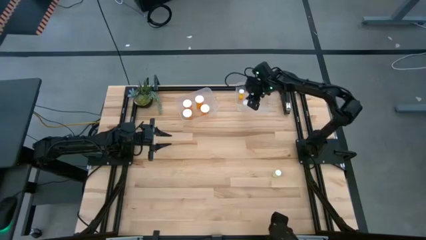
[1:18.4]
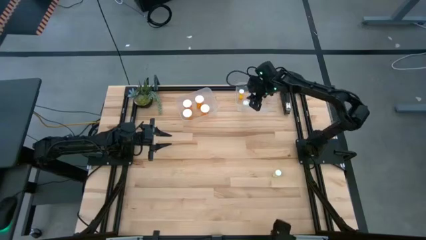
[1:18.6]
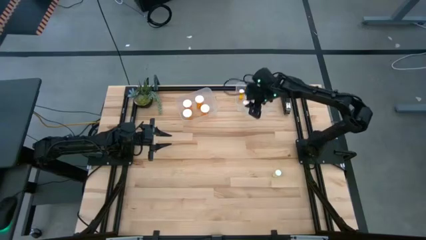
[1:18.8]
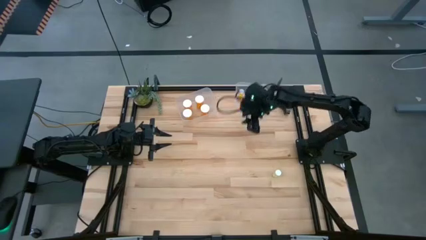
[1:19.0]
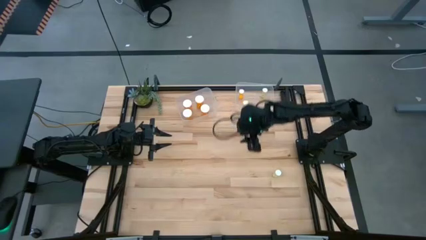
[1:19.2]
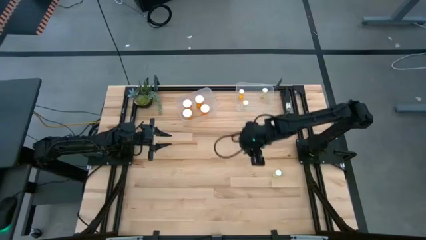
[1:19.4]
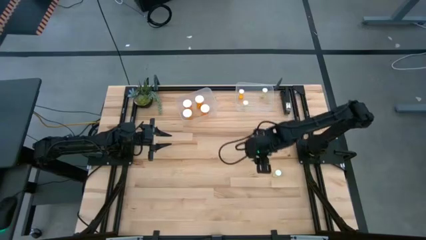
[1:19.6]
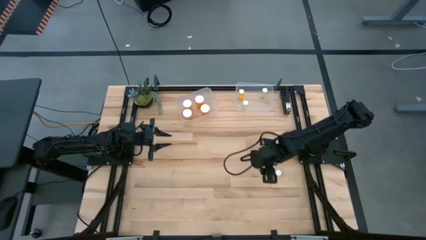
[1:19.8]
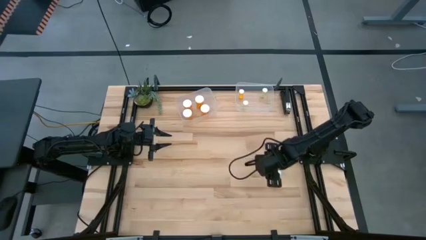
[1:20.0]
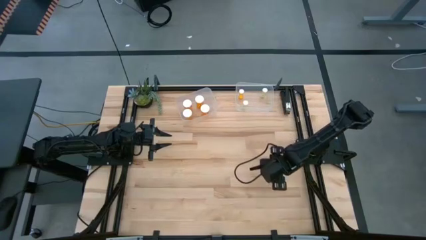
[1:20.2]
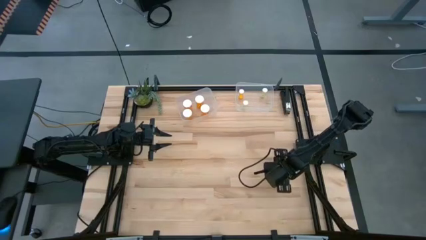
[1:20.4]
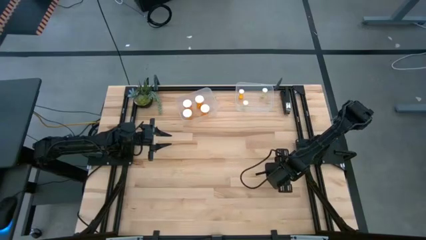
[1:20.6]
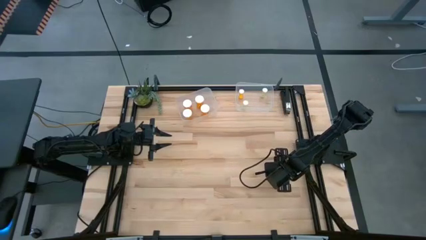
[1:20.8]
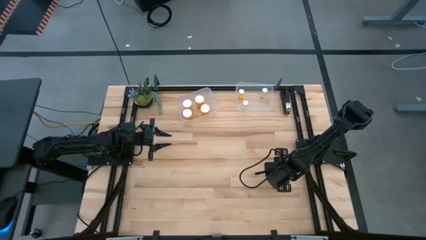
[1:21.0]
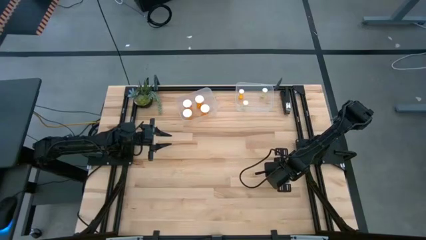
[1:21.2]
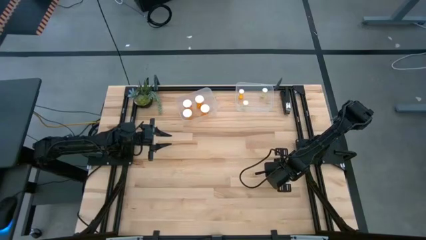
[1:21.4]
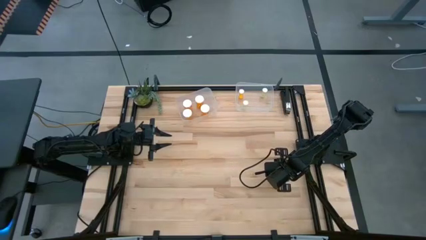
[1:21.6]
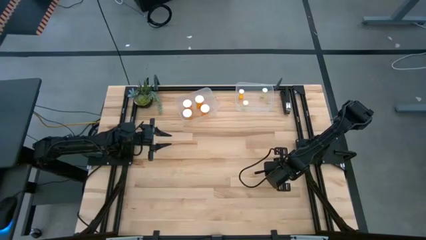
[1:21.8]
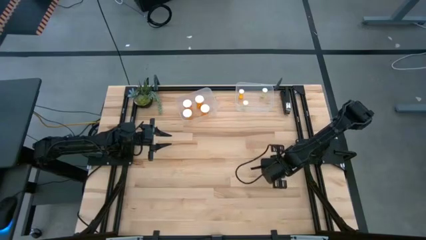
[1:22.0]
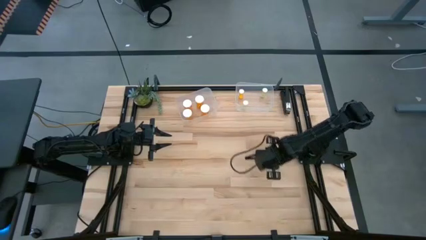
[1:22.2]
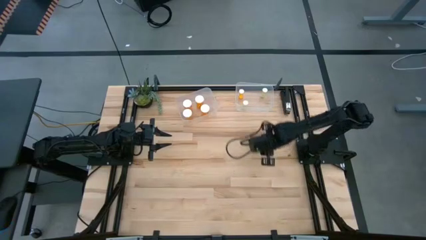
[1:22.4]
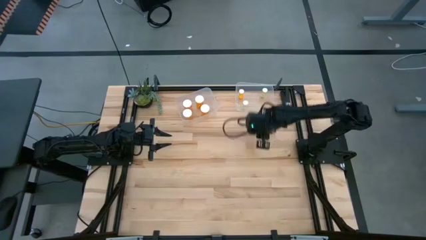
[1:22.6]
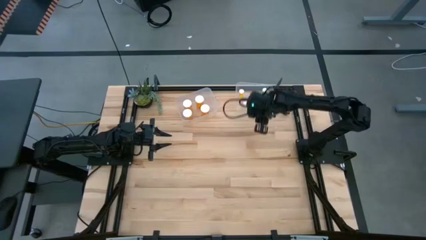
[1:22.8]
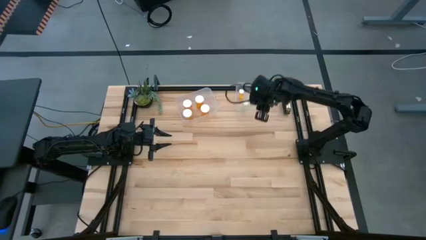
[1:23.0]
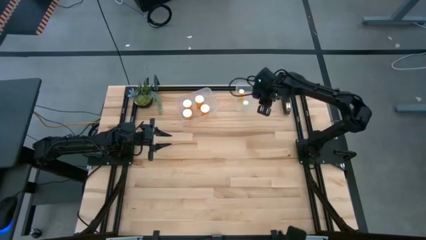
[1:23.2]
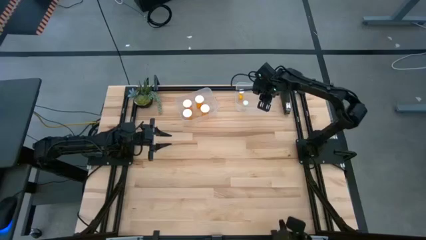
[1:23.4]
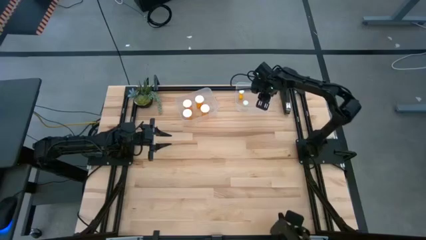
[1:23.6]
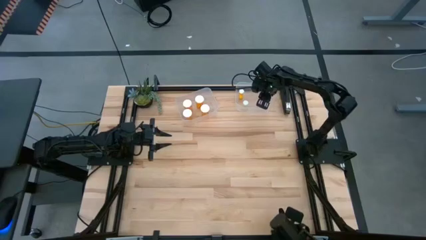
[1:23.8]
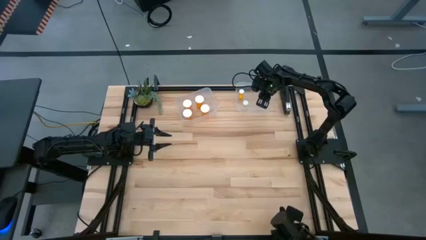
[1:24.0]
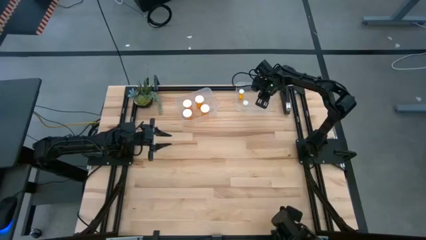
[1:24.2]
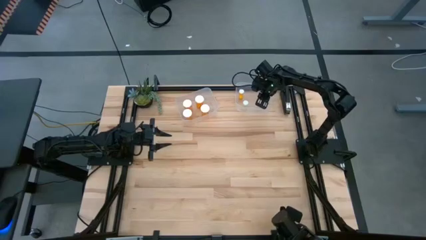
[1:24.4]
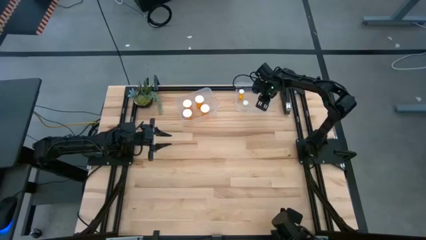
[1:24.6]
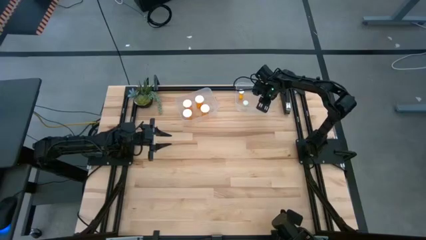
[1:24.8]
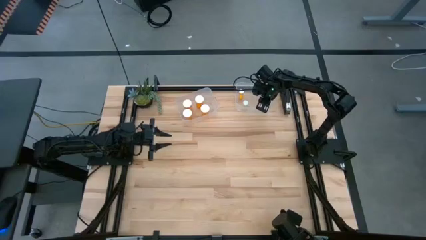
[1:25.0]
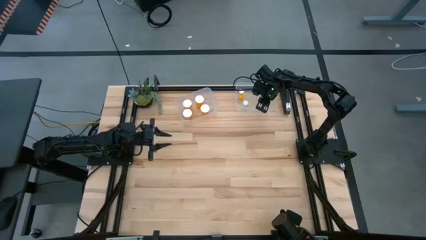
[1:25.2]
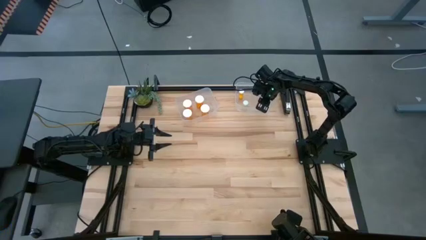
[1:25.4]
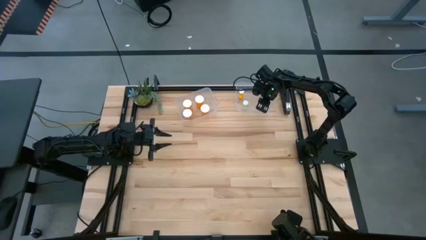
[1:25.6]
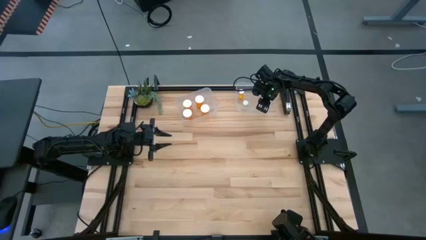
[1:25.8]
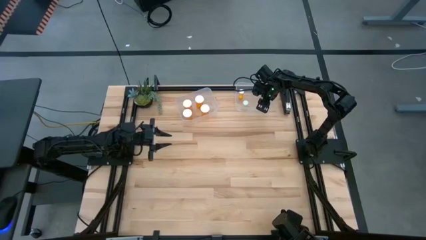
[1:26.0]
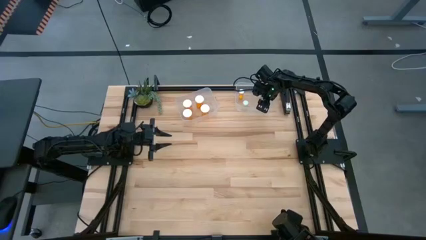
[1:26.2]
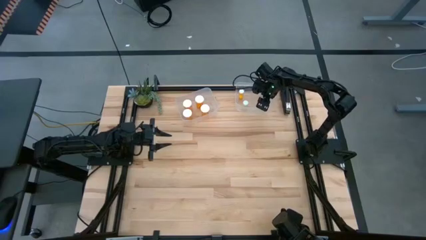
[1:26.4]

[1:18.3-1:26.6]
Task: Pick and place medicine bottles into bin by pill shape (circle, oval)
Put the yellow tablet bottle into the right transparent bin

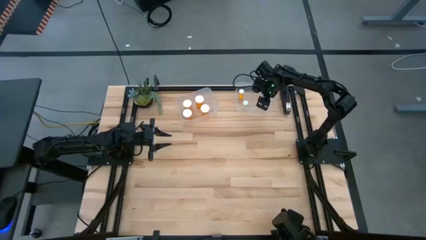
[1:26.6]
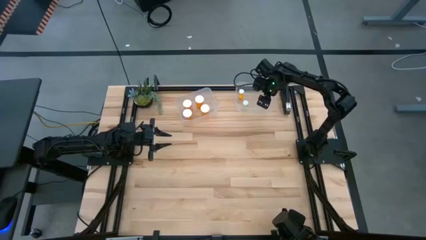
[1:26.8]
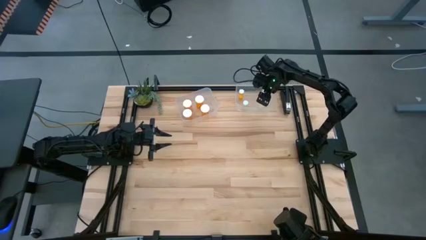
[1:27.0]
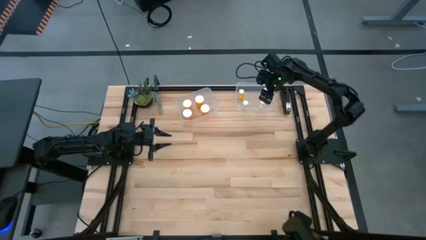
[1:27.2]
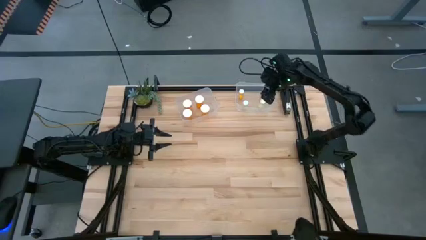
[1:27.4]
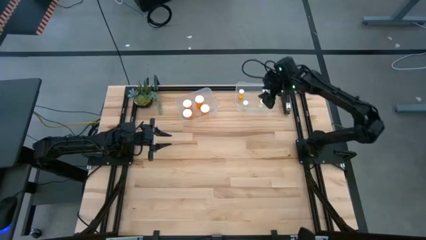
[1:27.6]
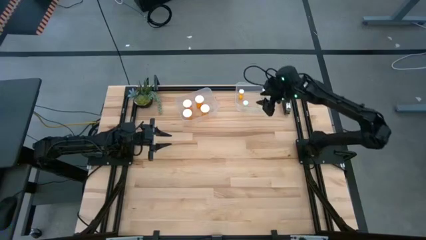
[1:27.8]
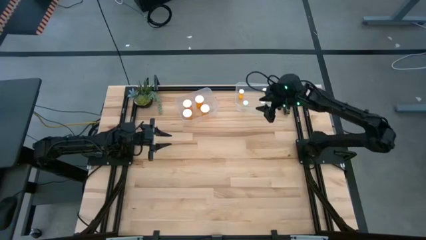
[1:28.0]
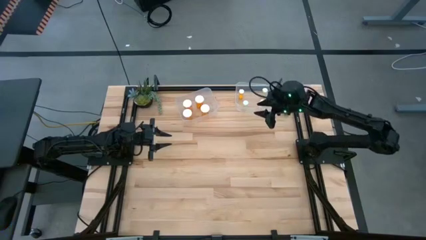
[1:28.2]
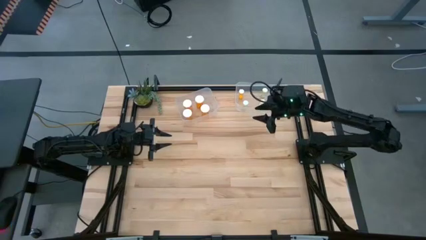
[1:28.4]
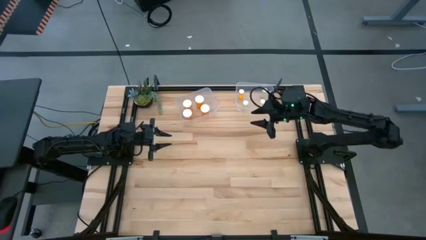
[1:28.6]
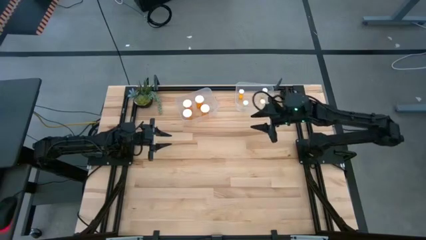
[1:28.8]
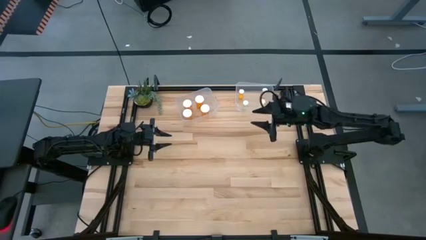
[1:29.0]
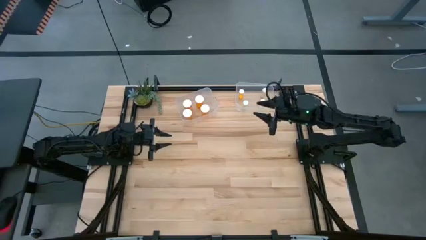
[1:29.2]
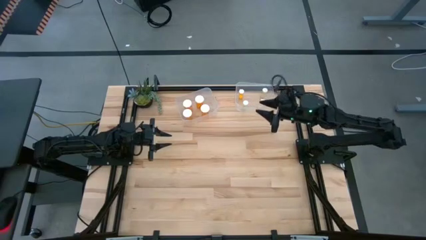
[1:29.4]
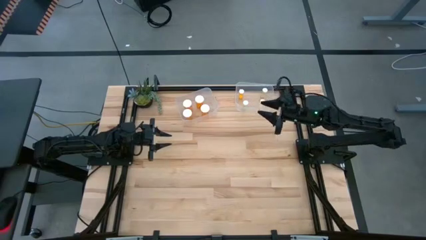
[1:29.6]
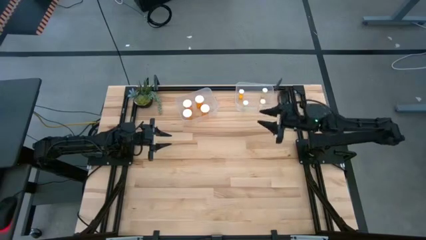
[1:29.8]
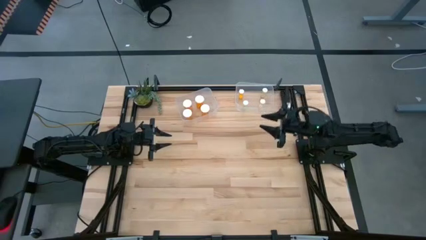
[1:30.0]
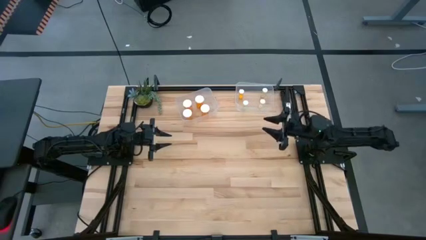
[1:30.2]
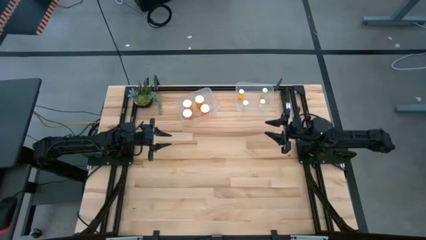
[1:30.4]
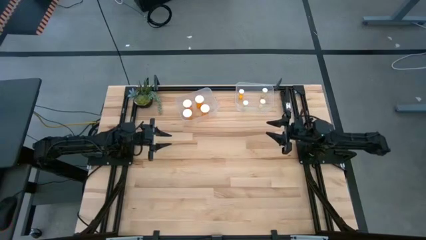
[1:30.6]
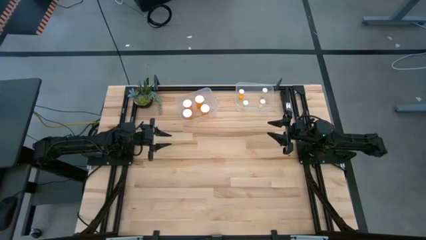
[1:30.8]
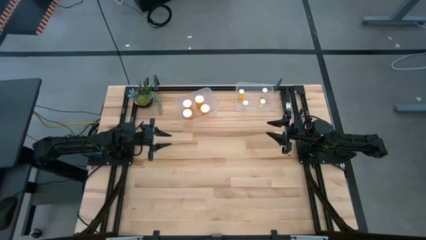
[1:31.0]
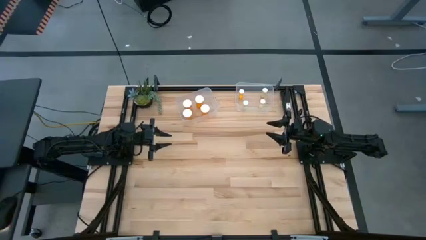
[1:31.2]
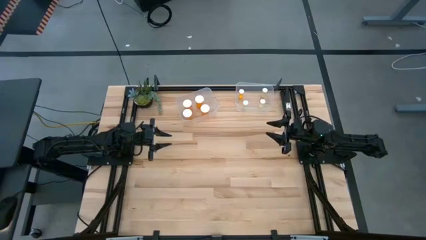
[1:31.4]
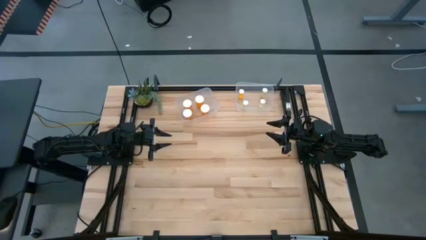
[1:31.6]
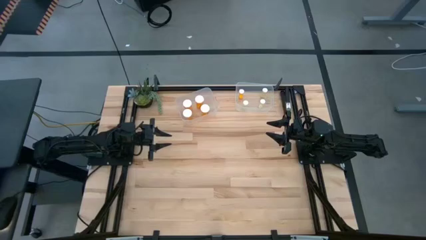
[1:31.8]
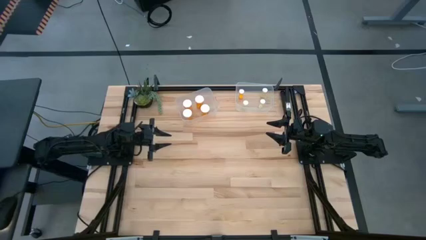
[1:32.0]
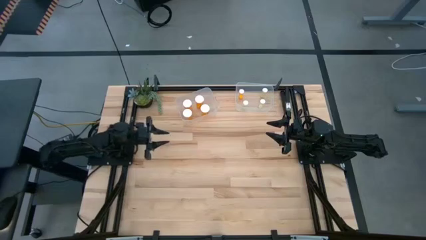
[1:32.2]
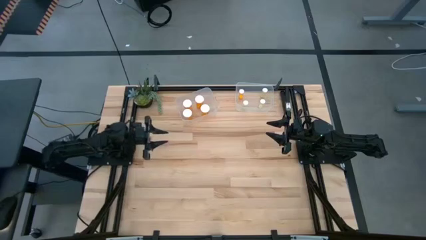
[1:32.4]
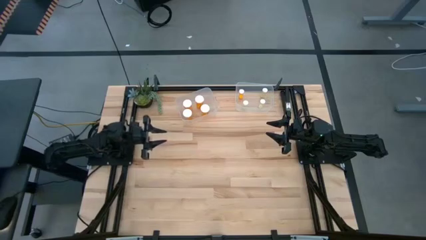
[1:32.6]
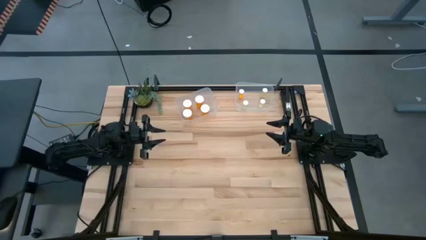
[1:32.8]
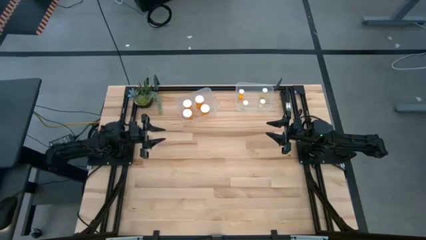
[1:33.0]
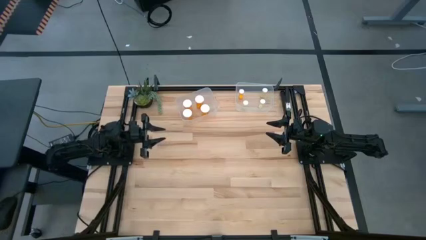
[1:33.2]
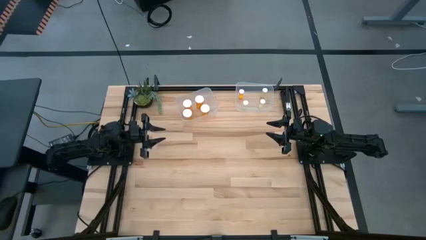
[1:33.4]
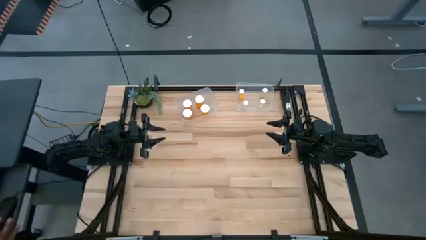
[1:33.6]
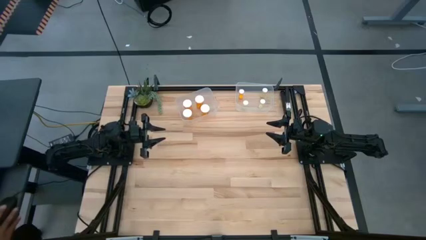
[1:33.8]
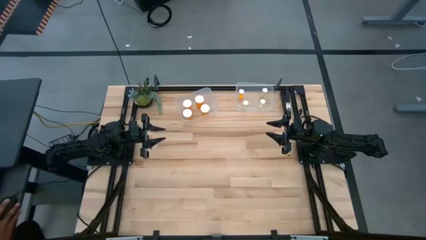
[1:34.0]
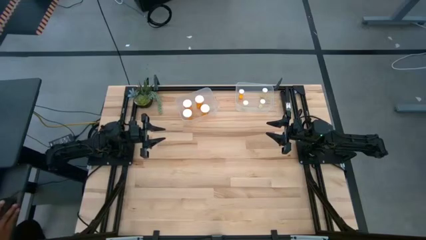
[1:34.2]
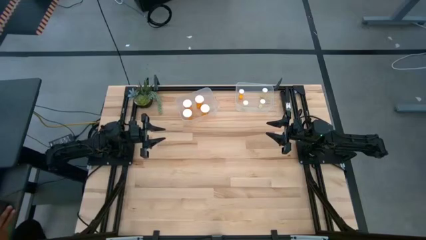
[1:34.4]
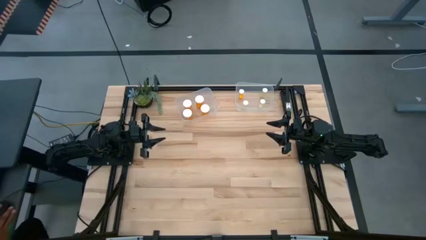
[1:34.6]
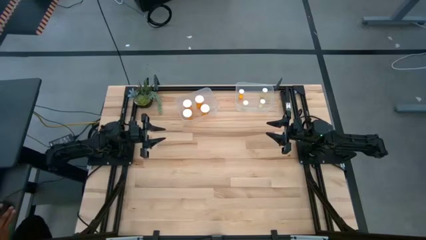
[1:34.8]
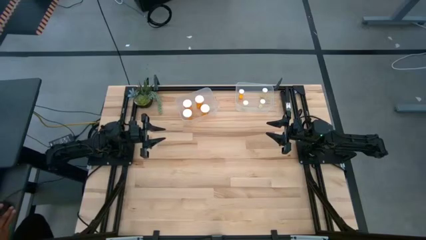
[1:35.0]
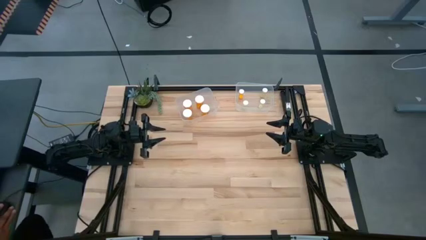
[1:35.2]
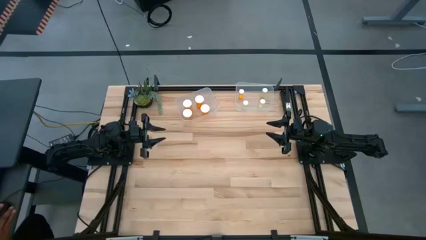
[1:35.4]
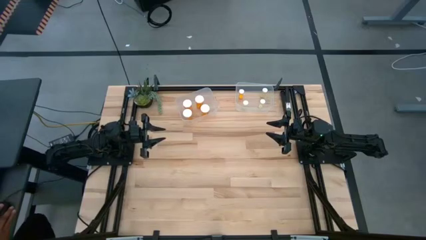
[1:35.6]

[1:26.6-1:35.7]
Return to Home Position
